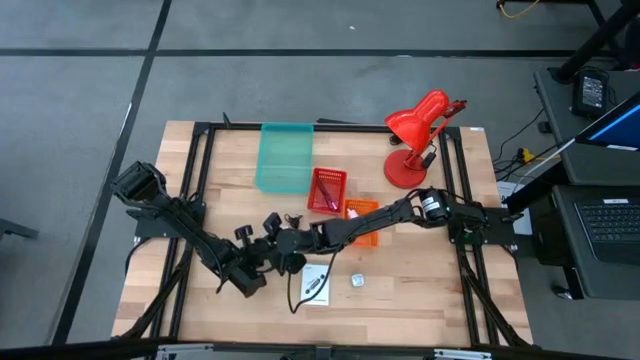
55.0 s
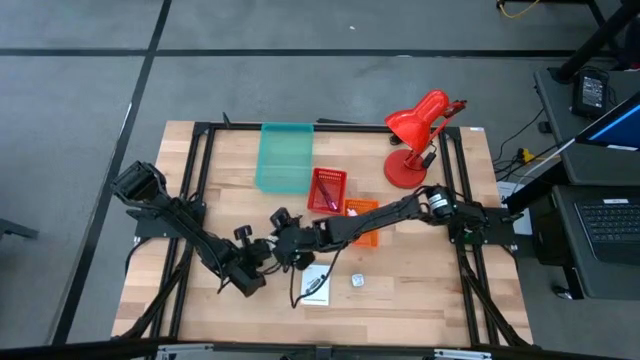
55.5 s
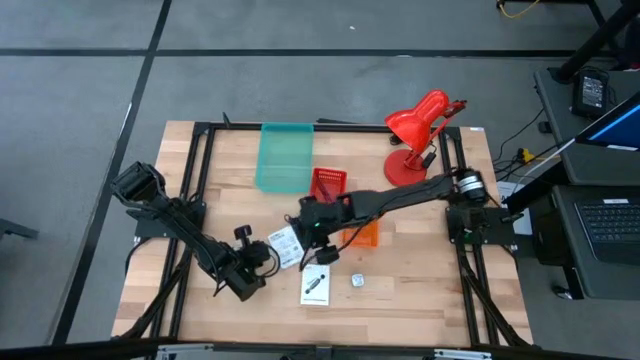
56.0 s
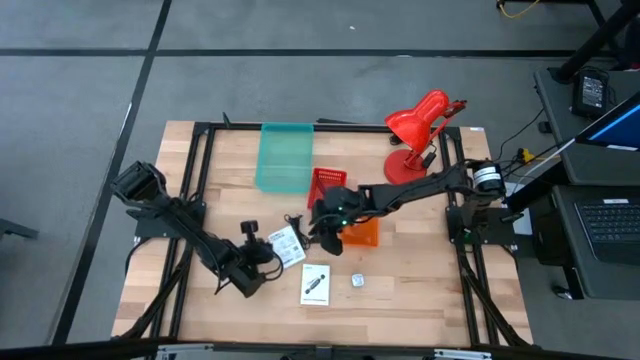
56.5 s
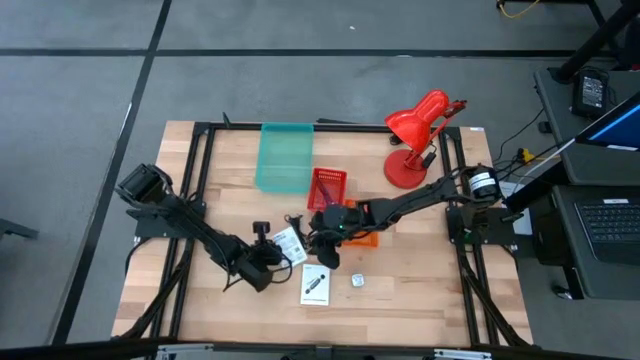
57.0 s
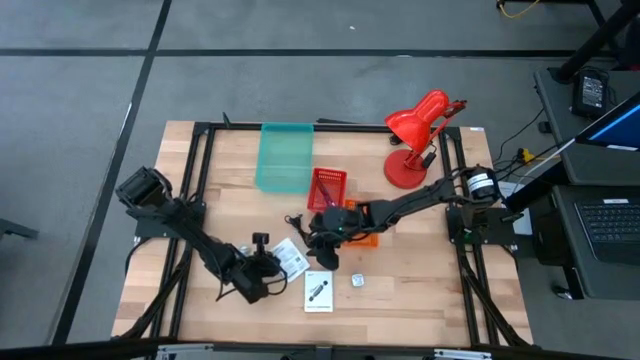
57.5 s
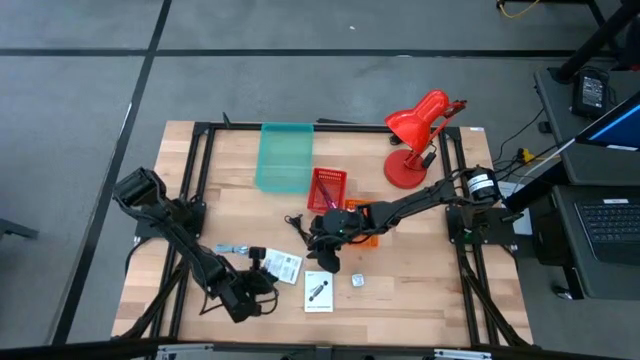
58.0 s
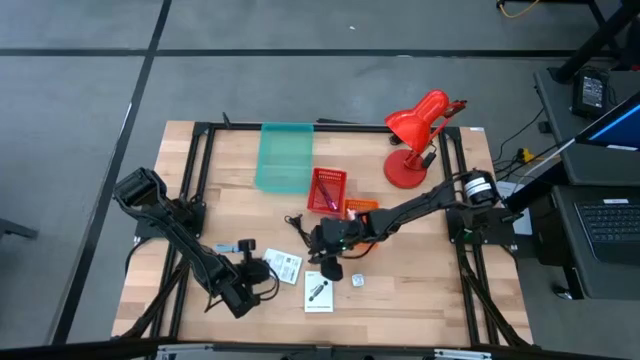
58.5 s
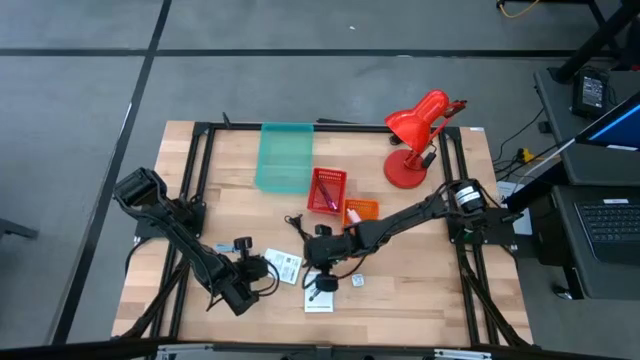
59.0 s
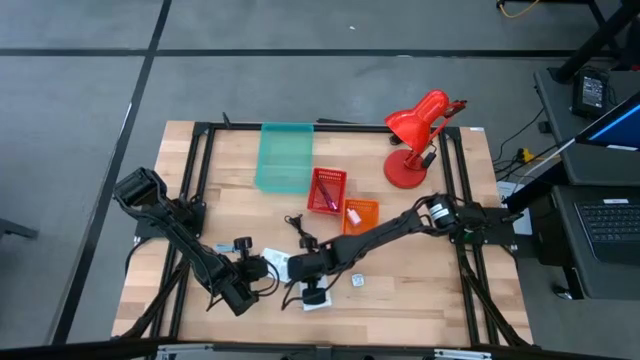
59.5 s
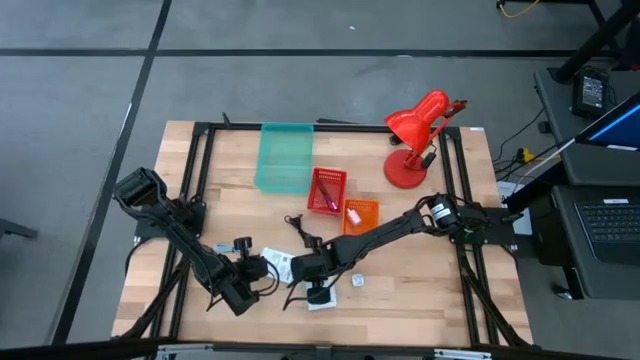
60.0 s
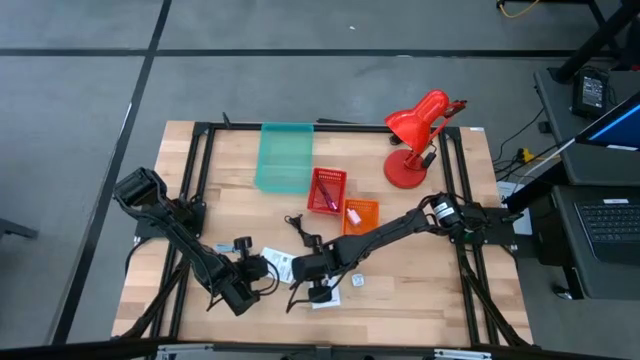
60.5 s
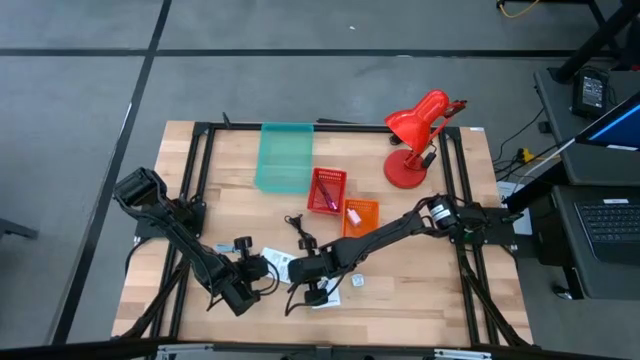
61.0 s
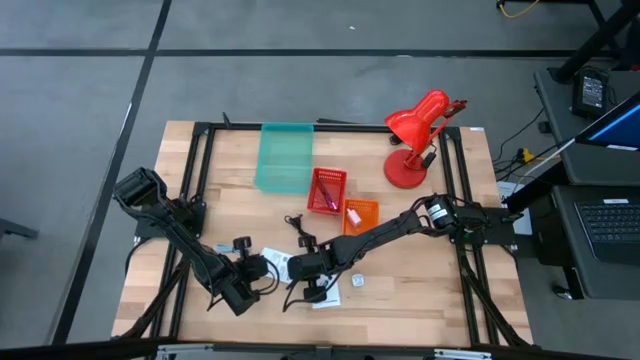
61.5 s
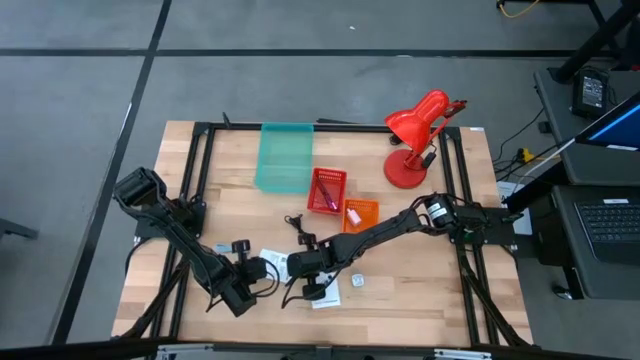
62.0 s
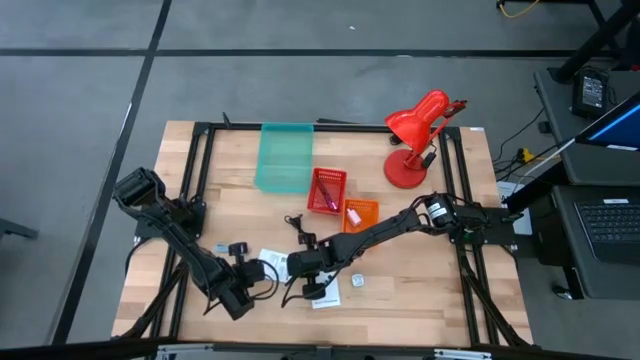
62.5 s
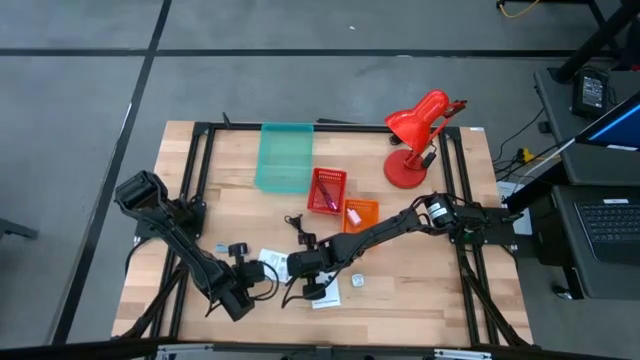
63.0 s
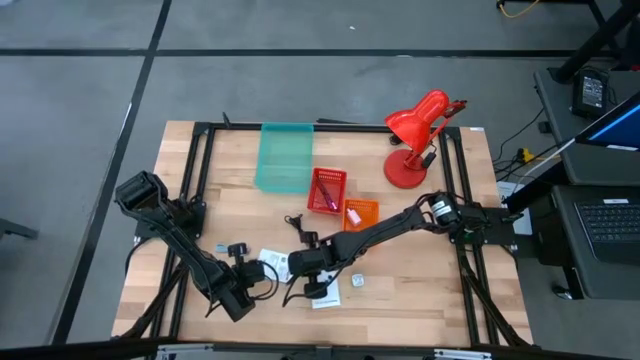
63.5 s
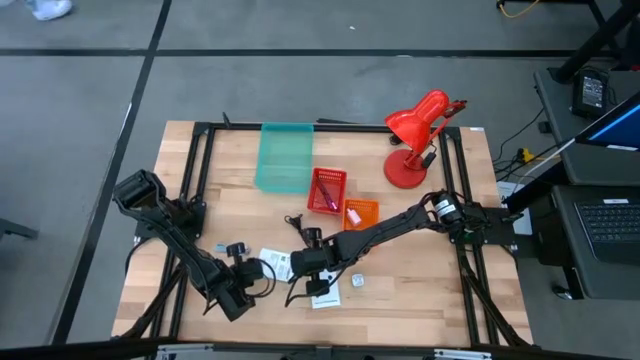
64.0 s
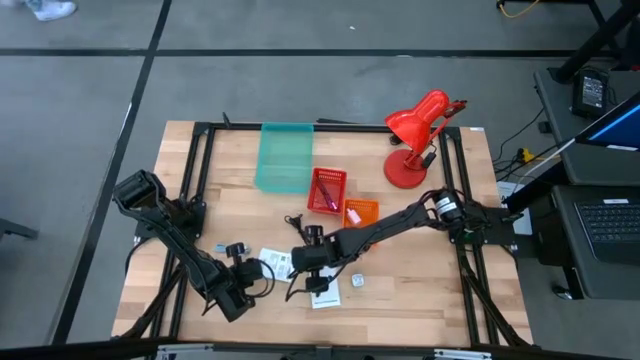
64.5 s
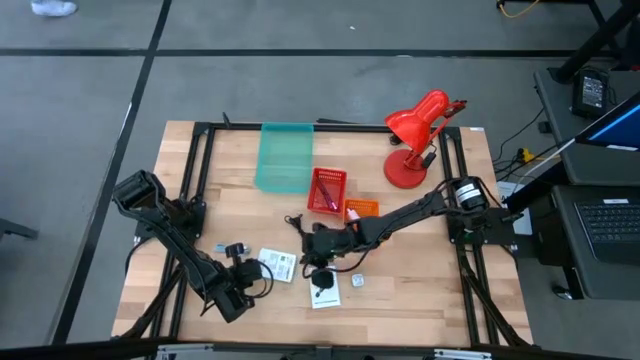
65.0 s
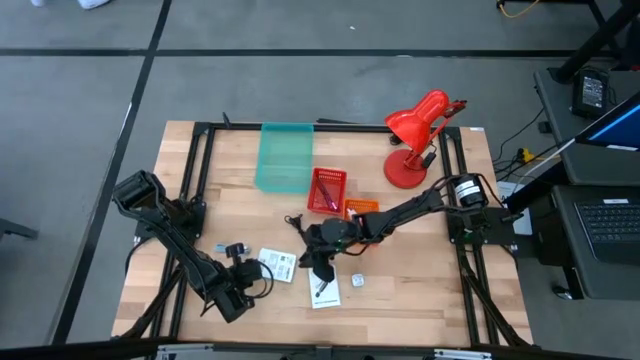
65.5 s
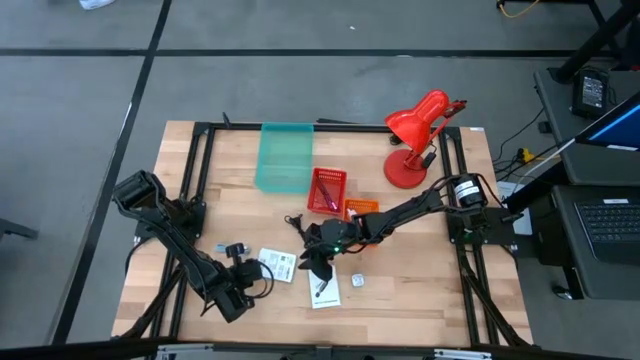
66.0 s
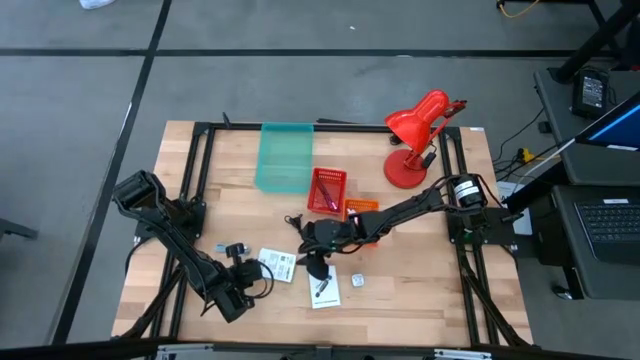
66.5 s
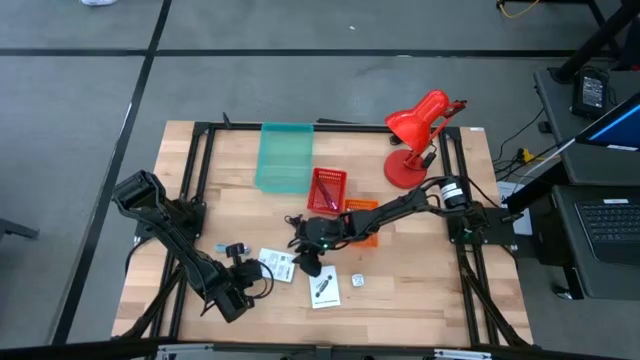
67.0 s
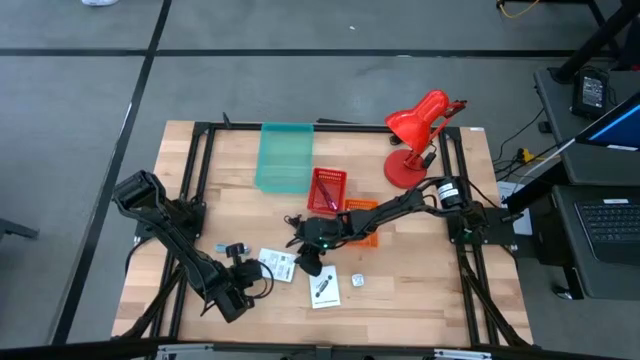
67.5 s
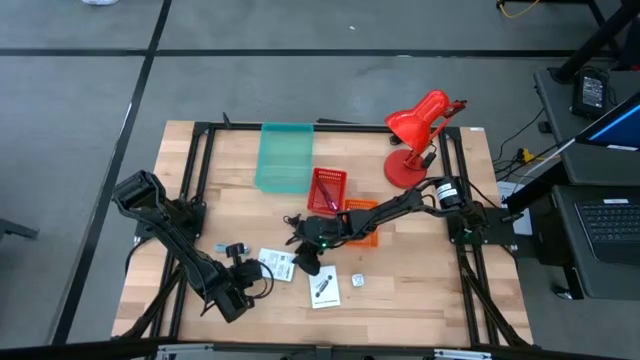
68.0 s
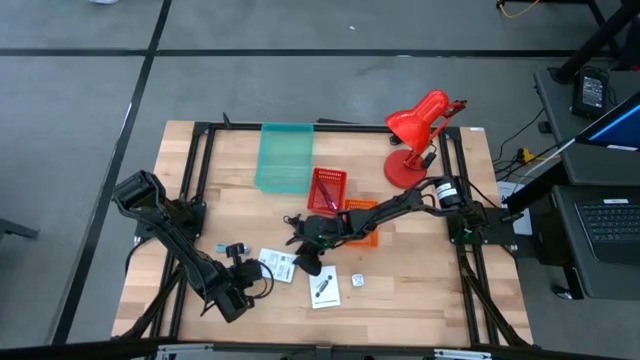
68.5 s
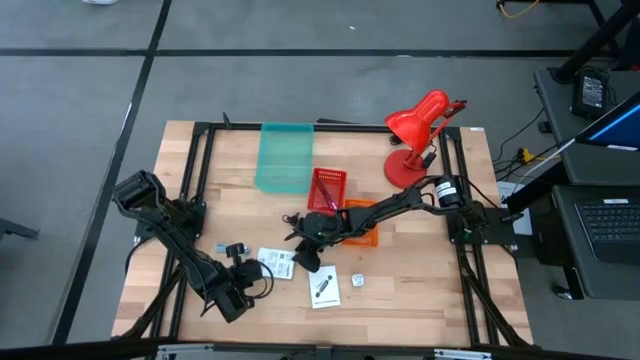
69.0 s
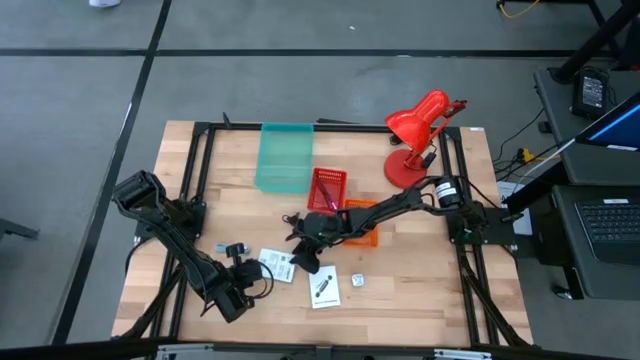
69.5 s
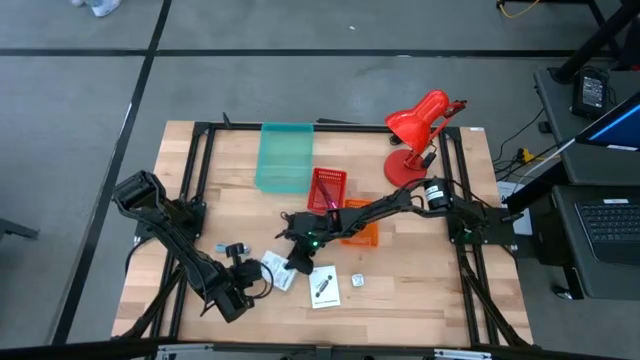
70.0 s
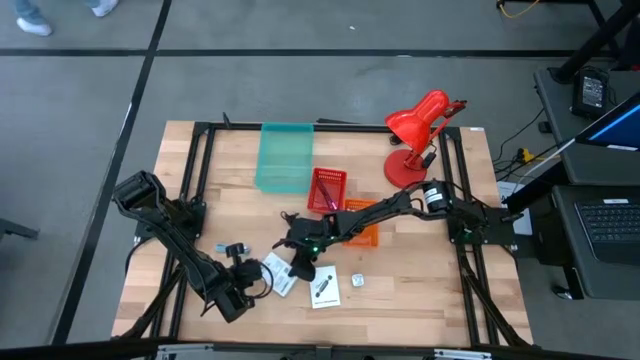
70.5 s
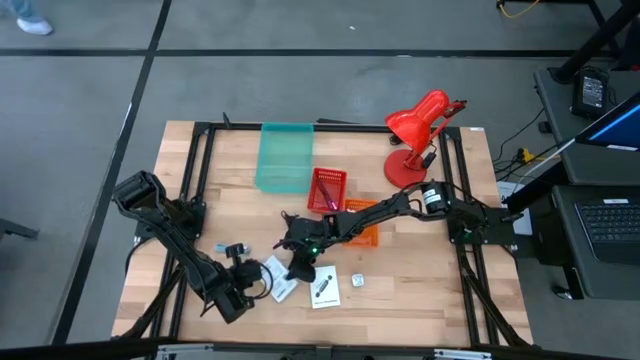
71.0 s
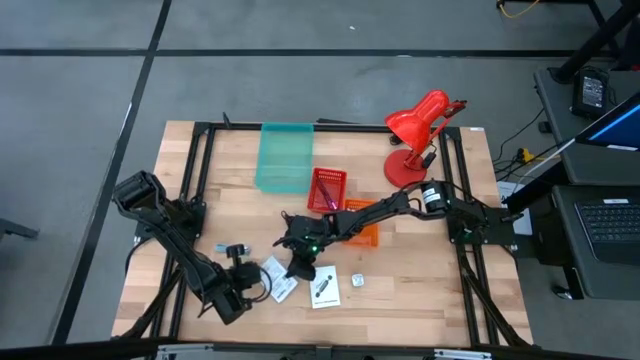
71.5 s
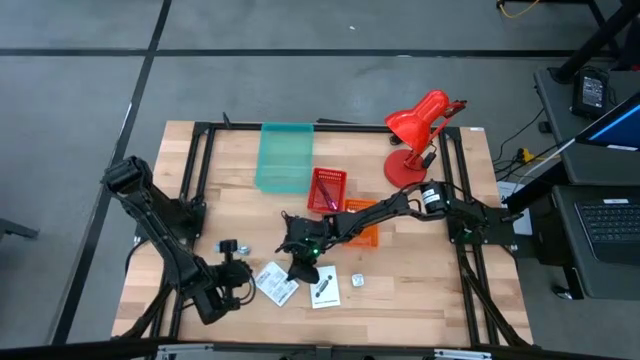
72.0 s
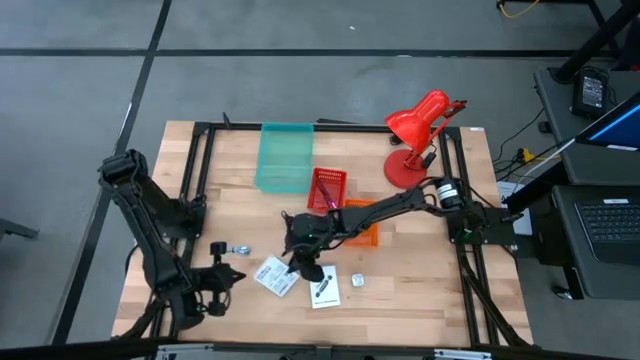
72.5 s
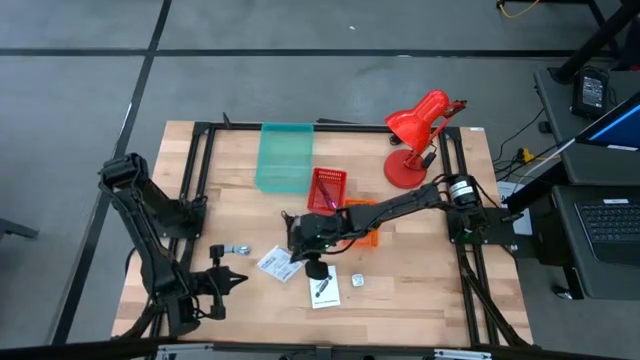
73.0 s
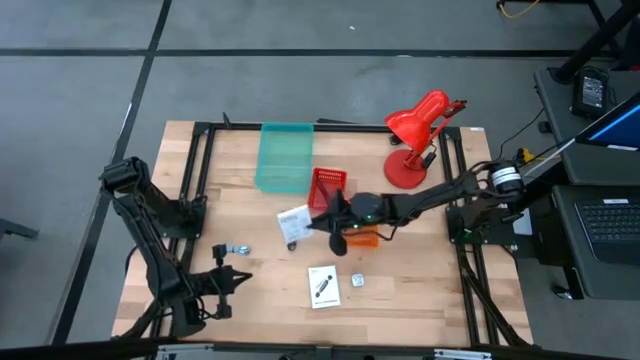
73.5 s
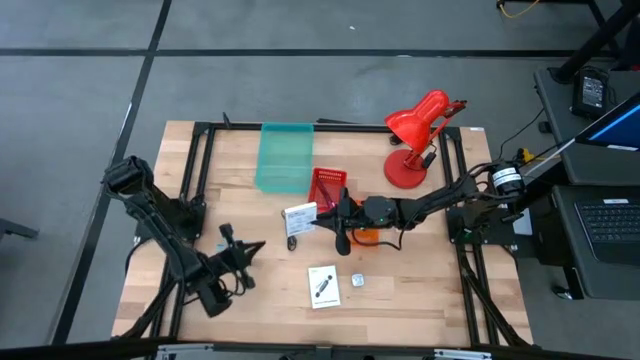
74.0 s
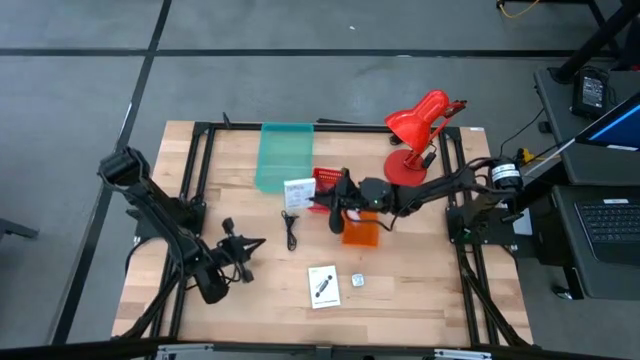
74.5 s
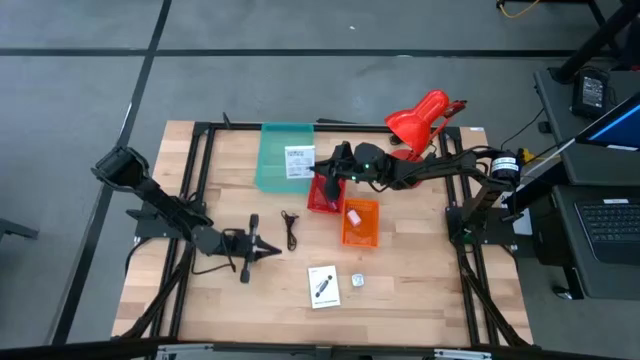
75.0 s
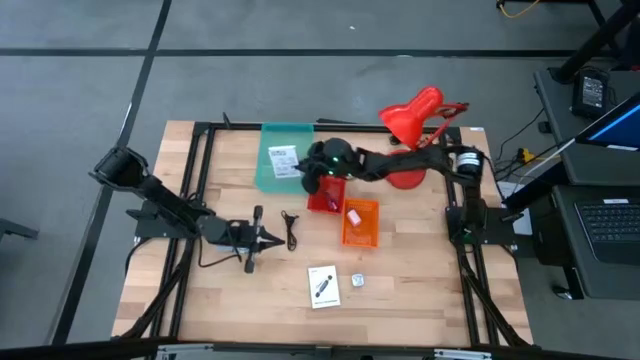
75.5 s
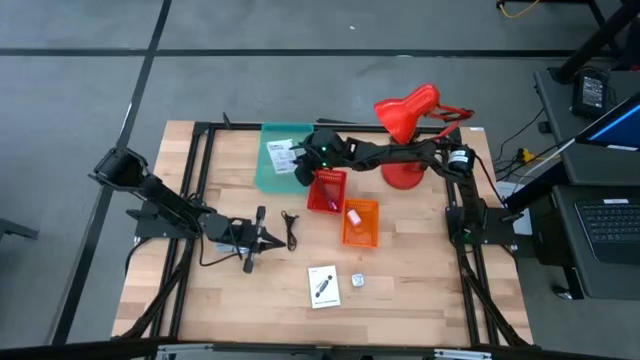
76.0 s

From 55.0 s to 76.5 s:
Task: Pick and place items into bin
Put the left white card reader box into the blue bin

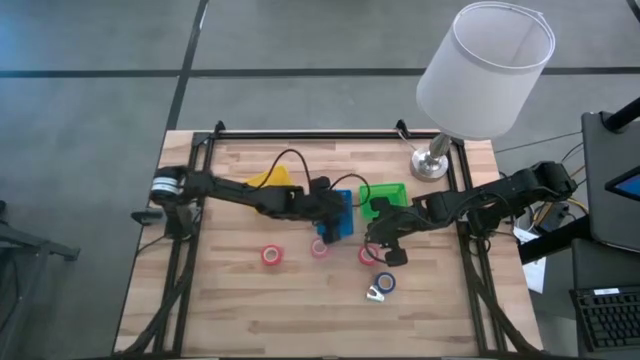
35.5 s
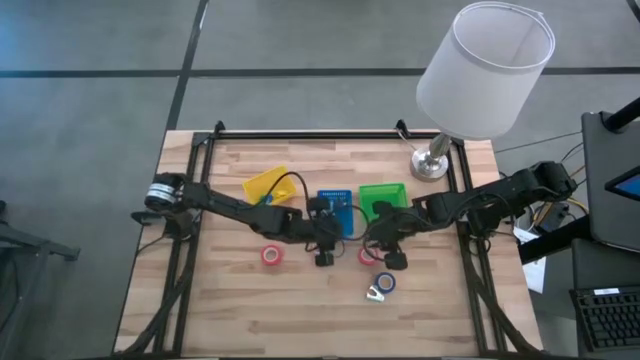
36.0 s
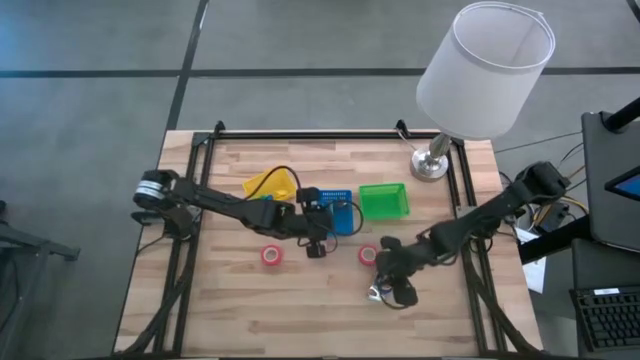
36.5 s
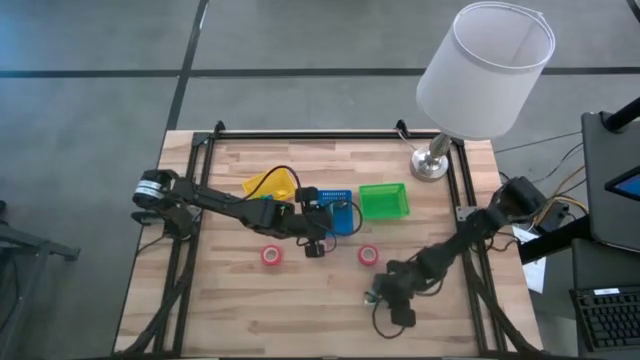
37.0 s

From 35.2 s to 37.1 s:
Task: Pick and place Stapler, Stapler remover, tape
Put the light blue staple remover into the blue basket
